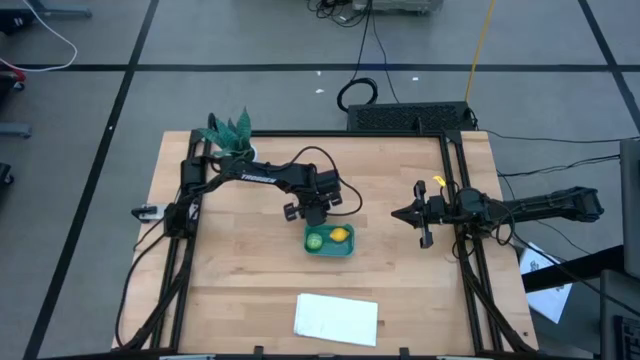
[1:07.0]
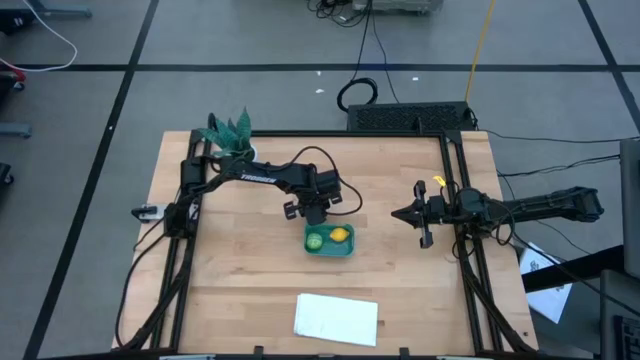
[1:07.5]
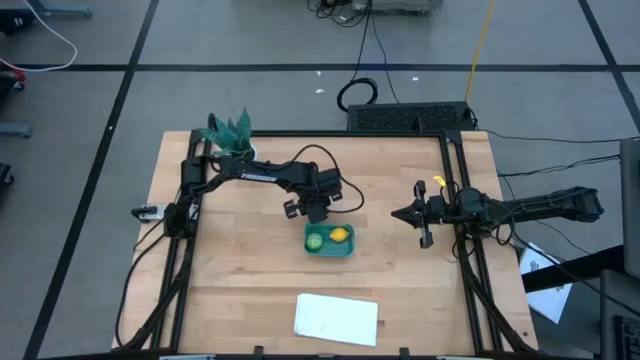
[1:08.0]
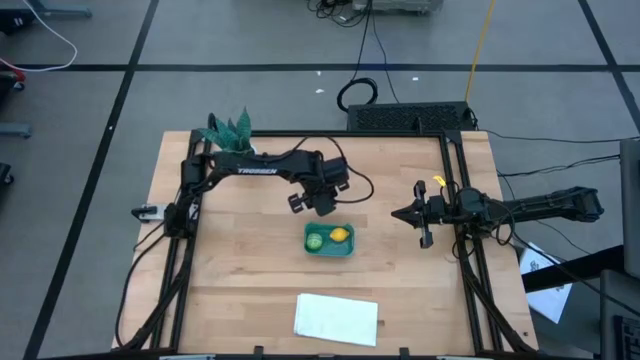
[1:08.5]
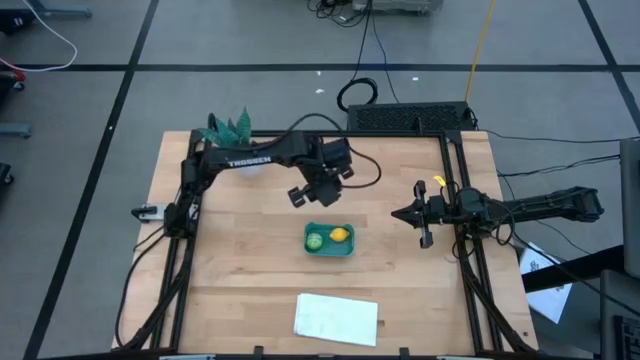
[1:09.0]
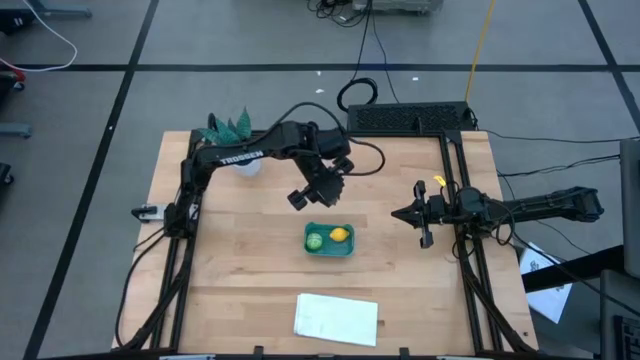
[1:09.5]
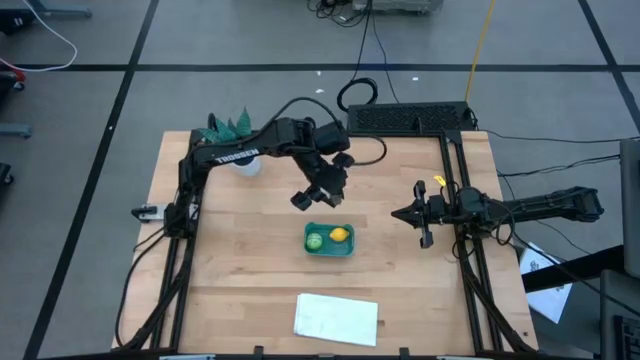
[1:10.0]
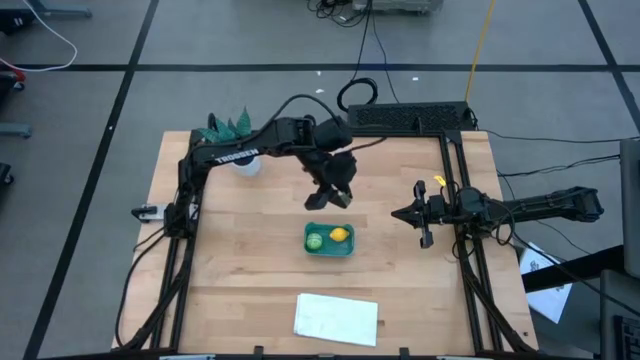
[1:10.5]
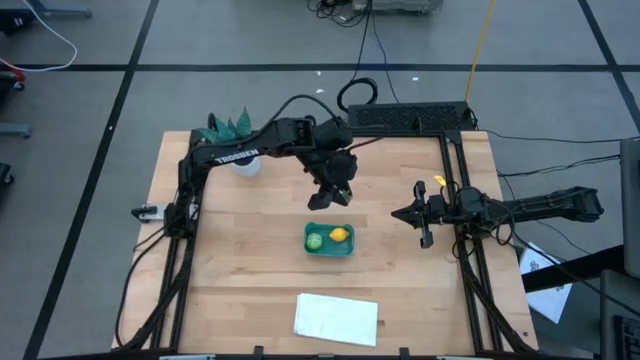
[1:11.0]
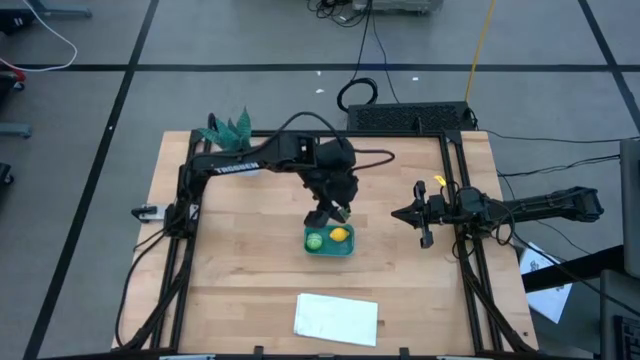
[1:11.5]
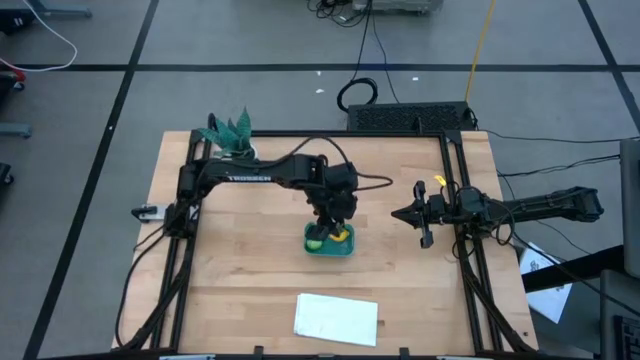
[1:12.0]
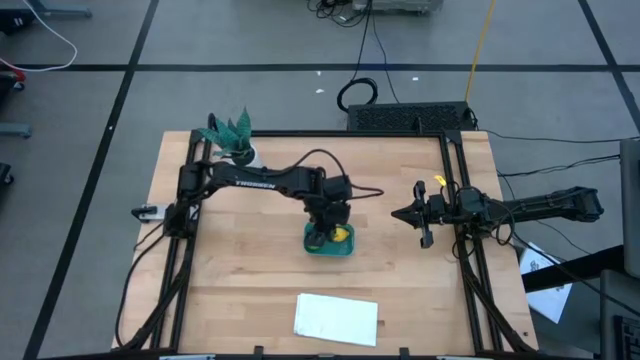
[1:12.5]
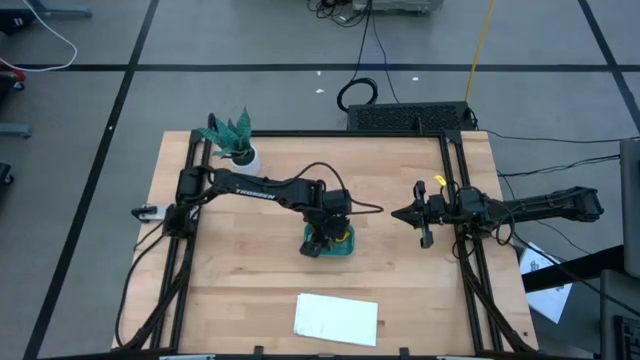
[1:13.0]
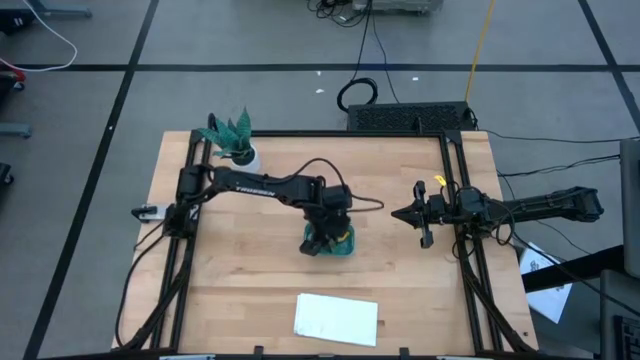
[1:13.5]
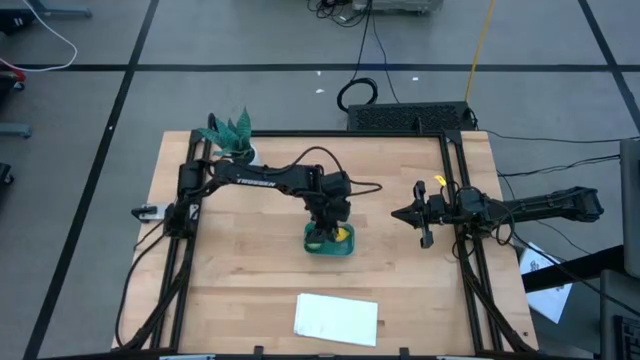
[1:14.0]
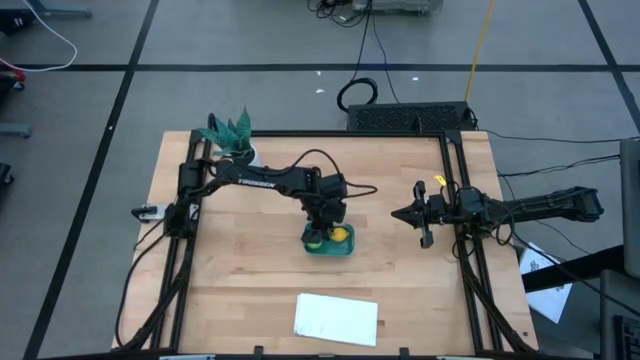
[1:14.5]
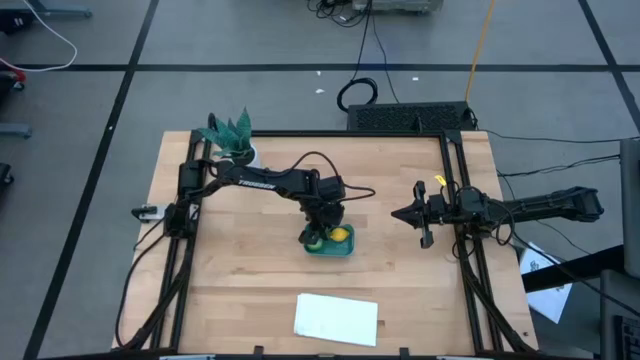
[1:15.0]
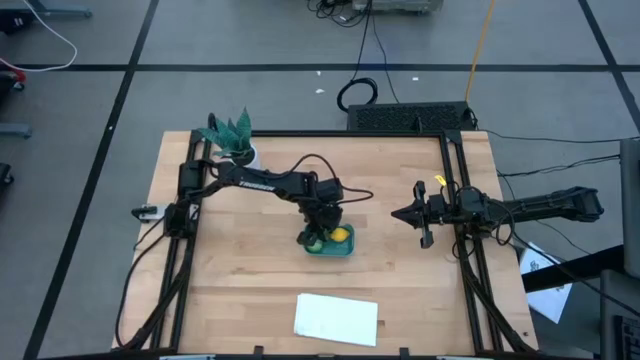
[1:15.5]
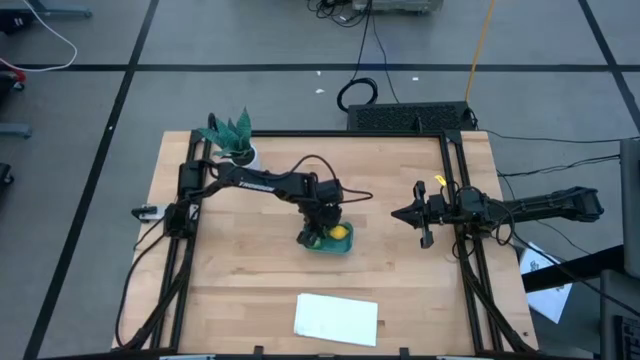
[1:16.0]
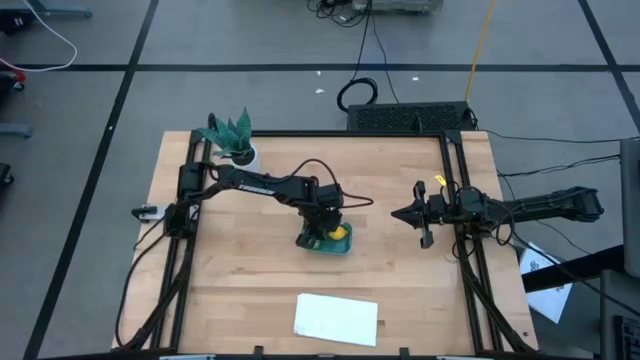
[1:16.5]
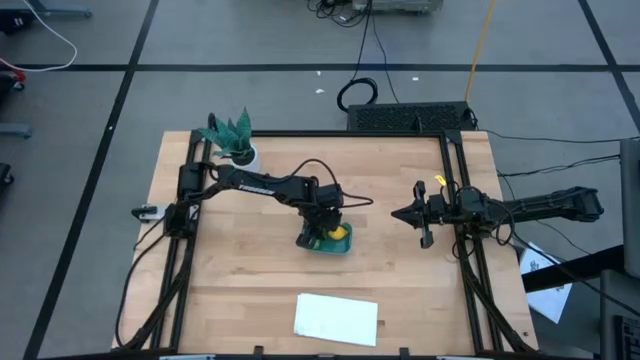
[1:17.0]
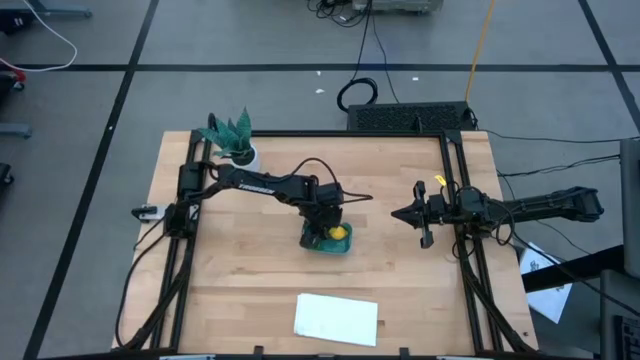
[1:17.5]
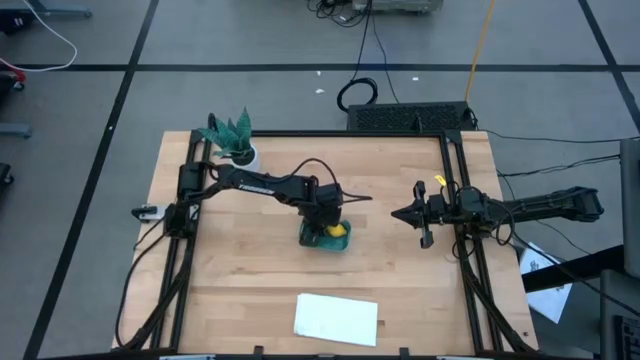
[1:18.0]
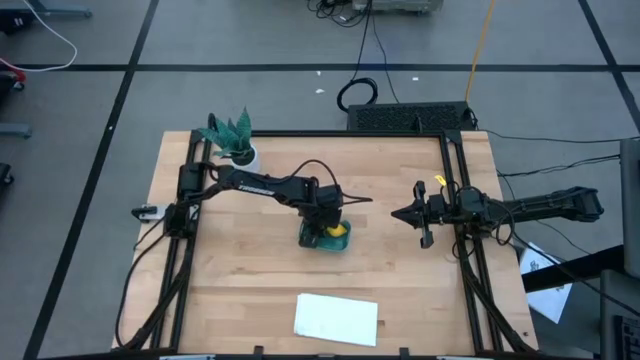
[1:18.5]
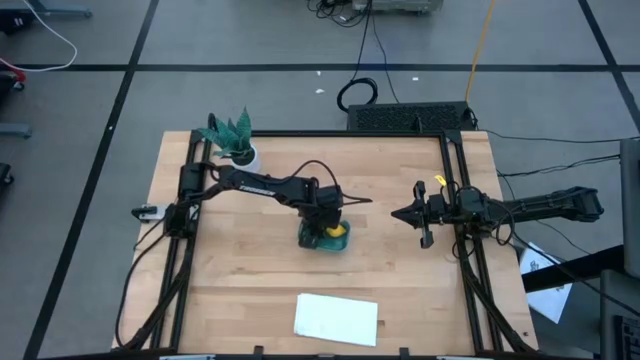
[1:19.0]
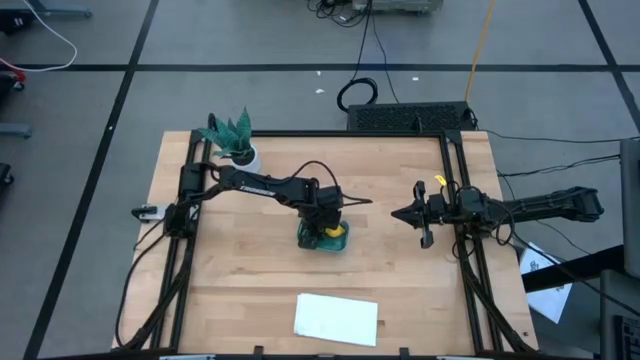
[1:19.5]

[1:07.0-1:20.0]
Task: Pick and placing Produce into tupperware
Put the strawberry into the blue bin

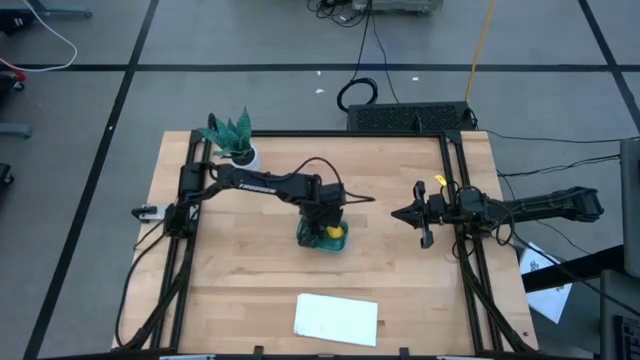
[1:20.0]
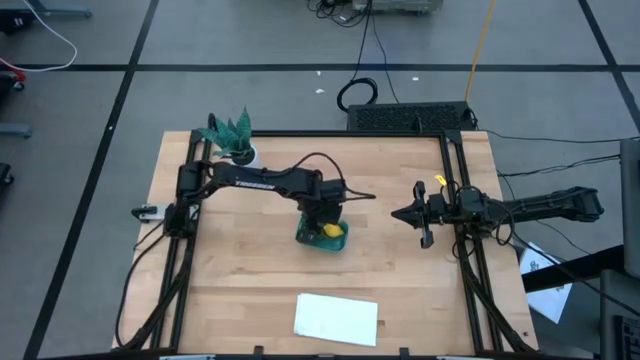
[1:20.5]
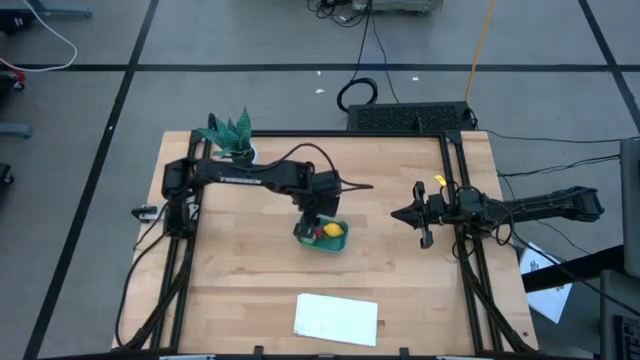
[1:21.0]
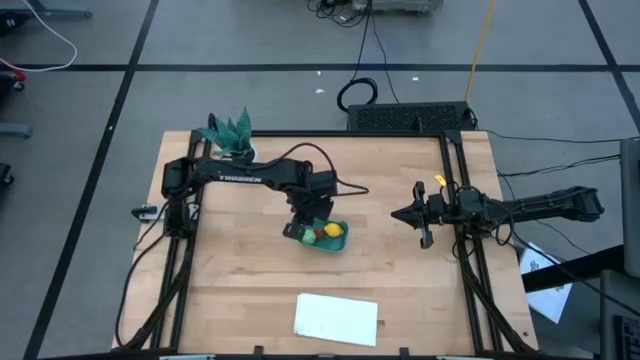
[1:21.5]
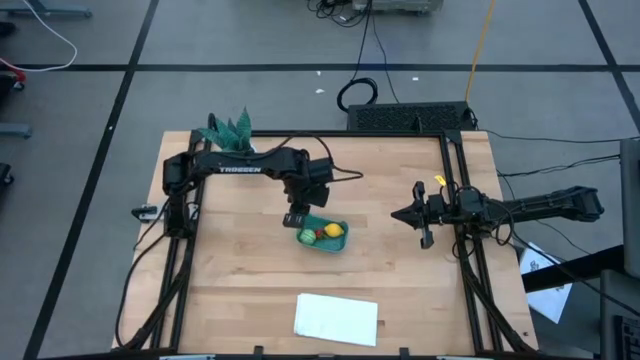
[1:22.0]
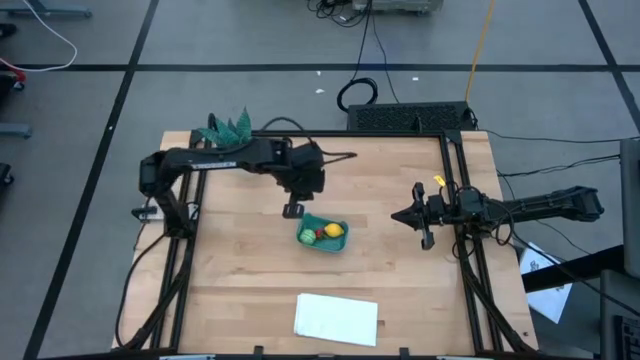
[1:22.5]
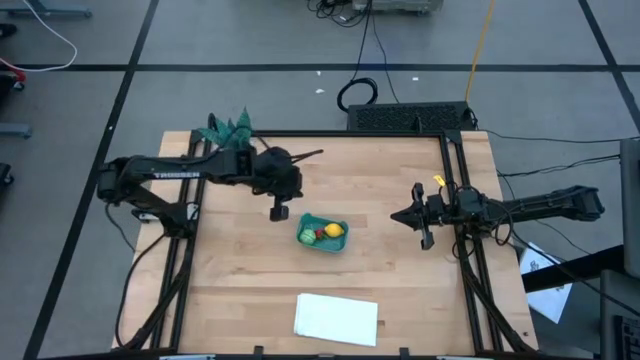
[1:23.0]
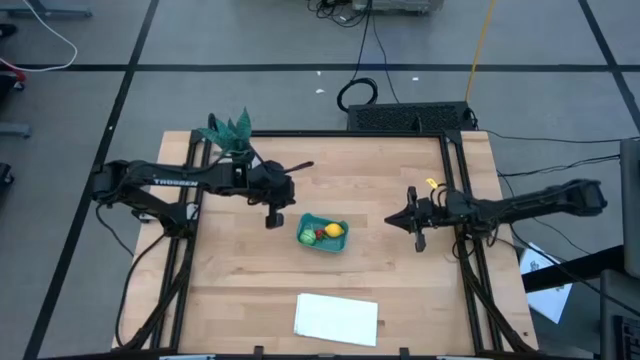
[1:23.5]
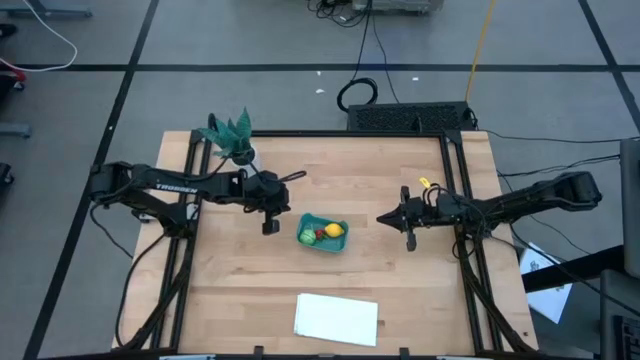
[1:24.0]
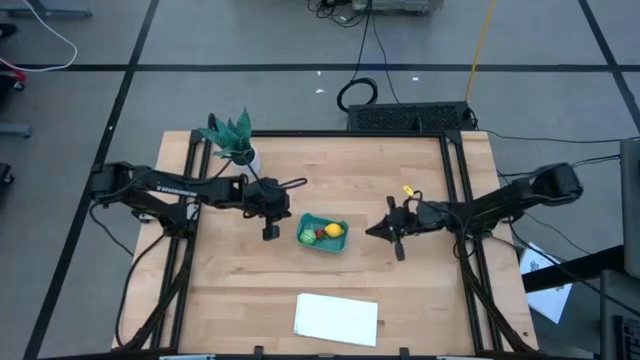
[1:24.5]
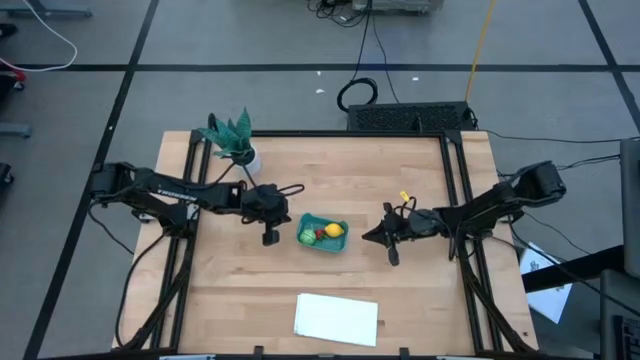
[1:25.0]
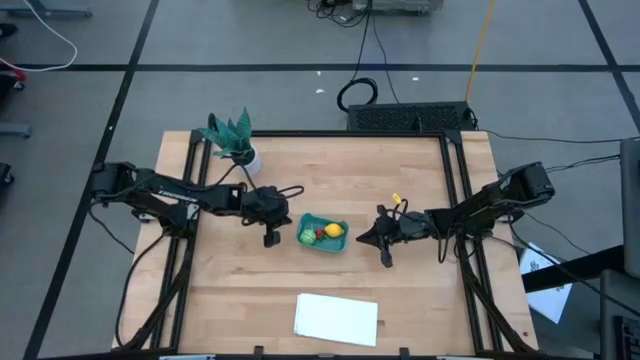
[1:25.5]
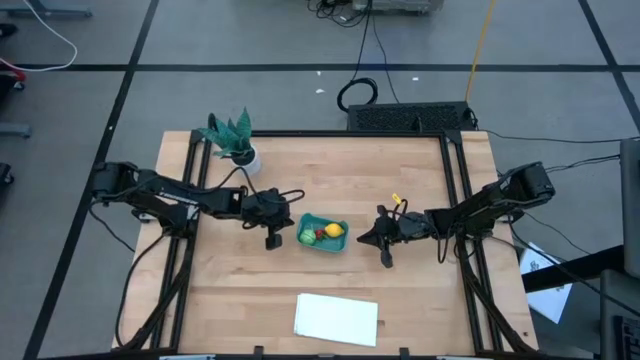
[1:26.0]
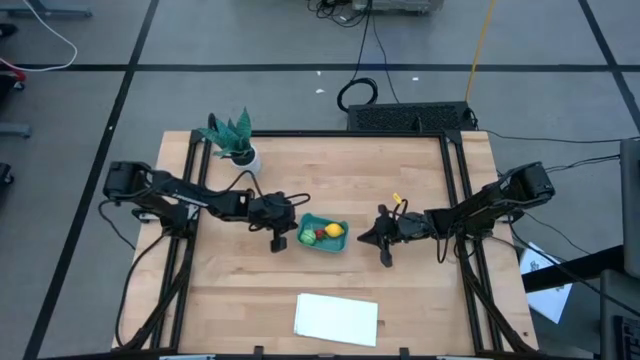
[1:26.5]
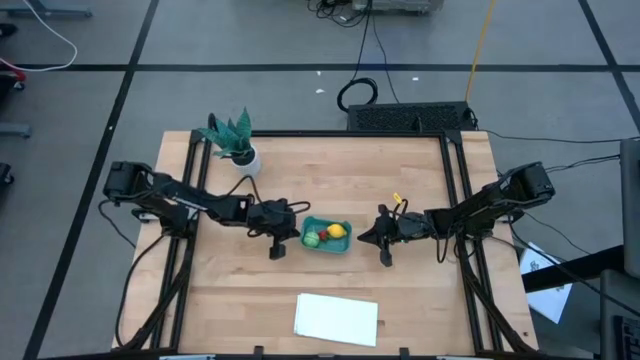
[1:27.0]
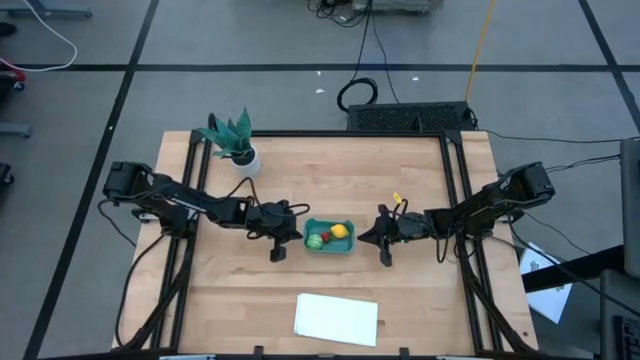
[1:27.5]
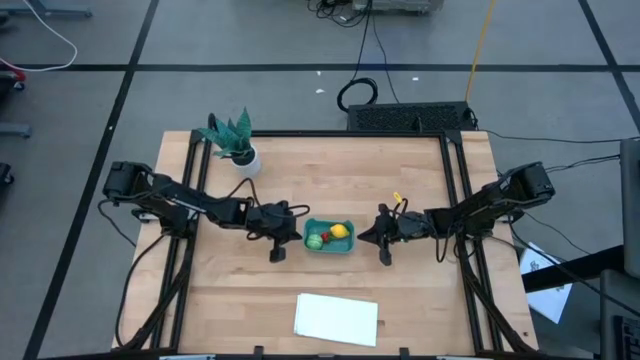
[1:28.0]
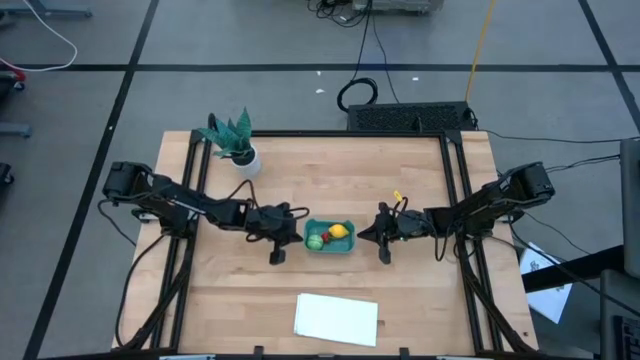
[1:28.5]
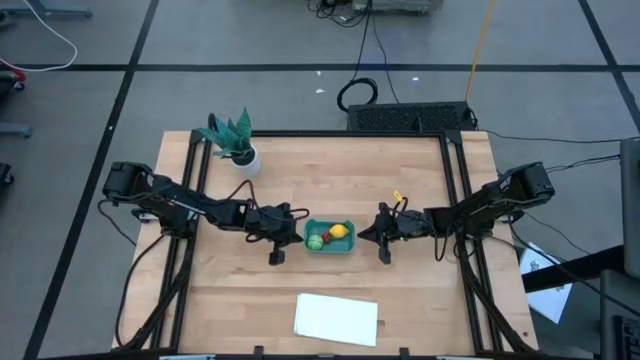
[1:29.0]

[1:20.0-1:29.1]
Adjust the blue bin
